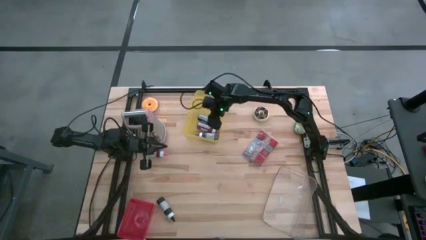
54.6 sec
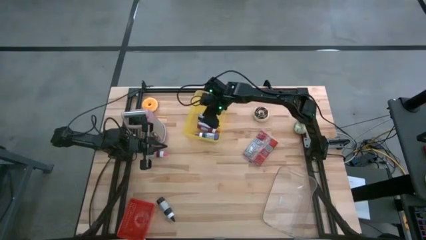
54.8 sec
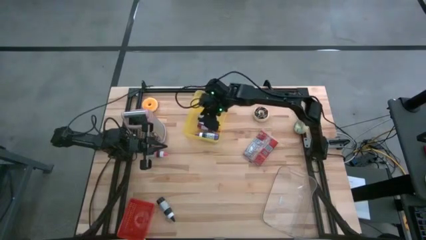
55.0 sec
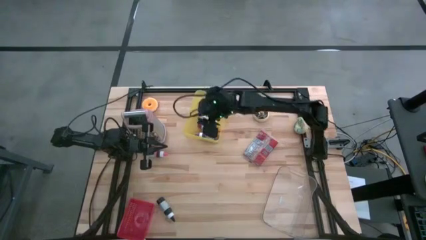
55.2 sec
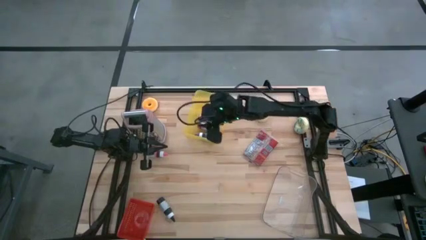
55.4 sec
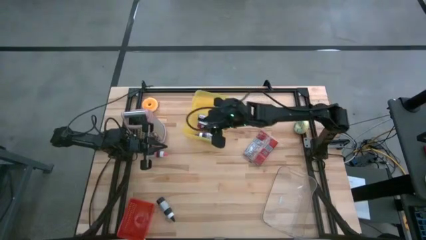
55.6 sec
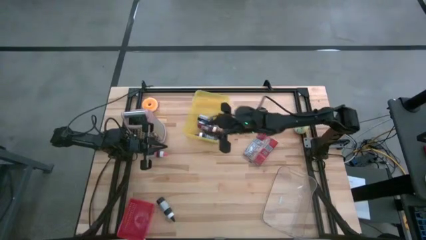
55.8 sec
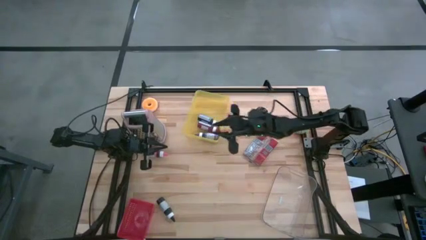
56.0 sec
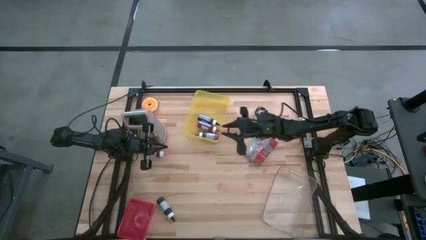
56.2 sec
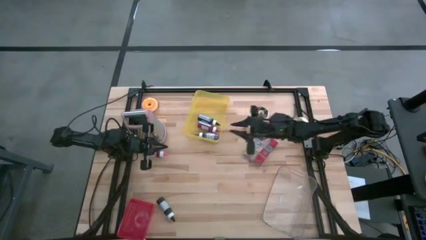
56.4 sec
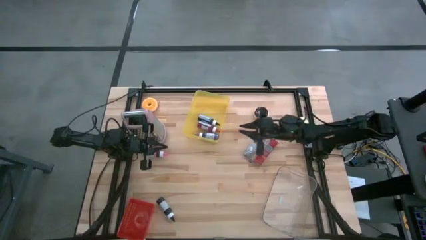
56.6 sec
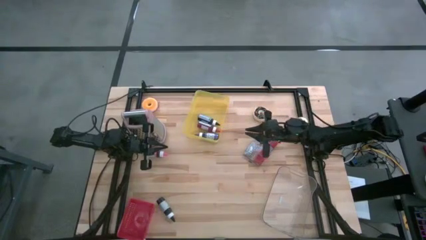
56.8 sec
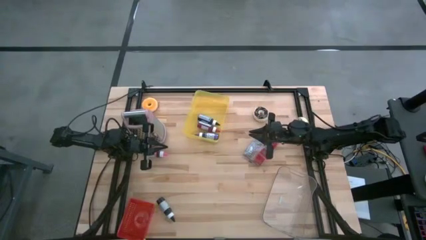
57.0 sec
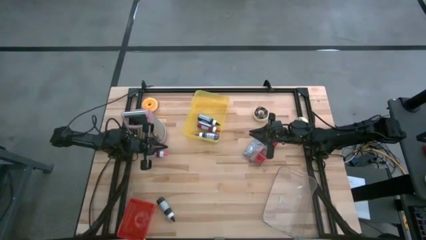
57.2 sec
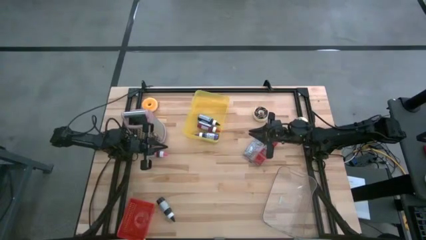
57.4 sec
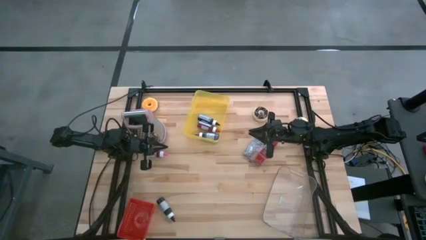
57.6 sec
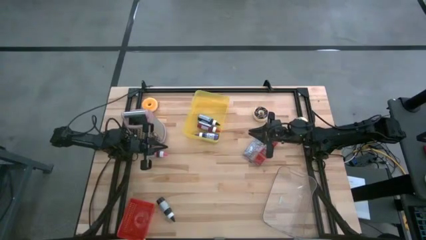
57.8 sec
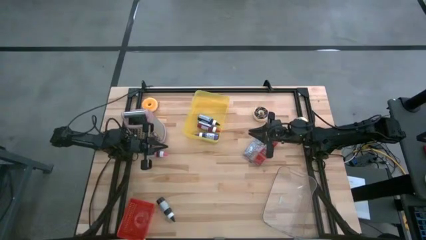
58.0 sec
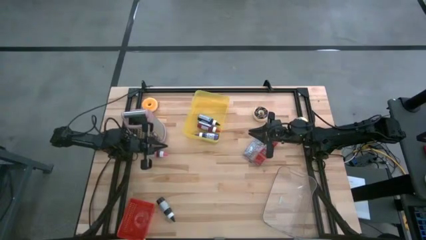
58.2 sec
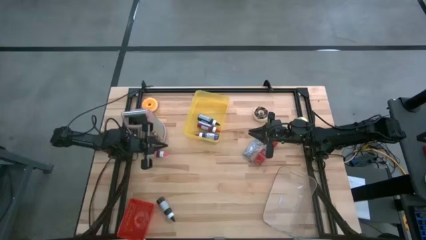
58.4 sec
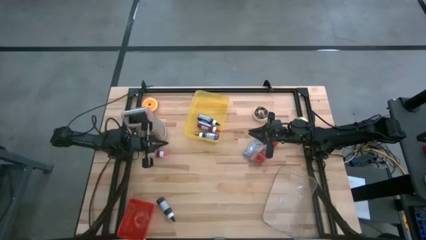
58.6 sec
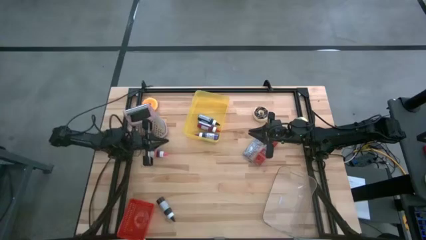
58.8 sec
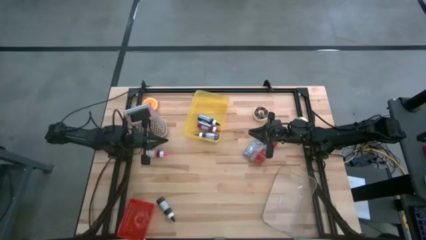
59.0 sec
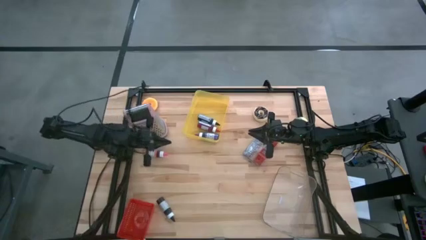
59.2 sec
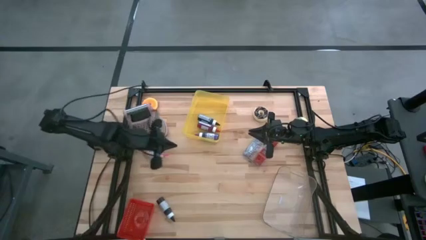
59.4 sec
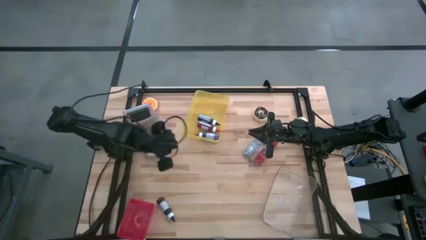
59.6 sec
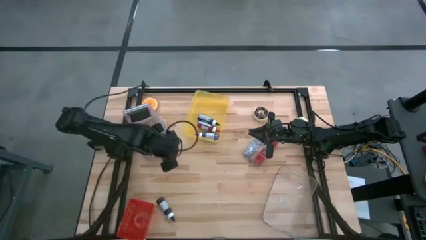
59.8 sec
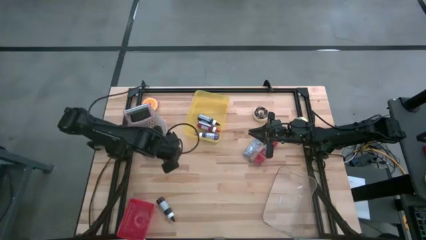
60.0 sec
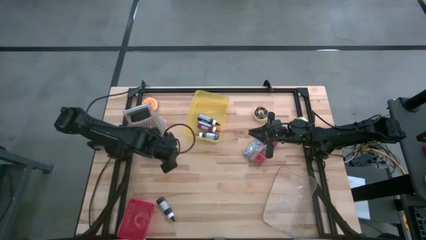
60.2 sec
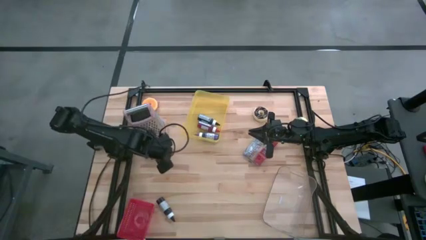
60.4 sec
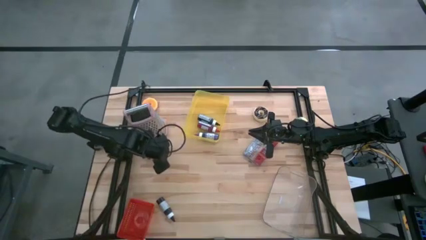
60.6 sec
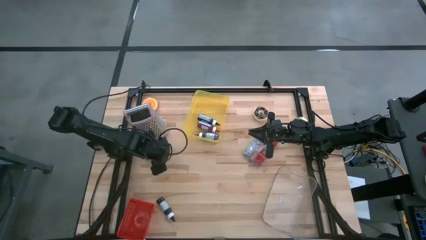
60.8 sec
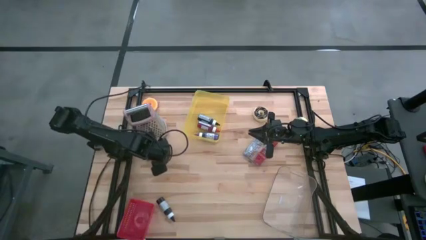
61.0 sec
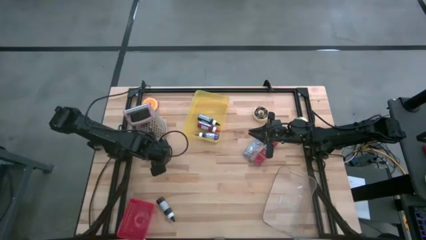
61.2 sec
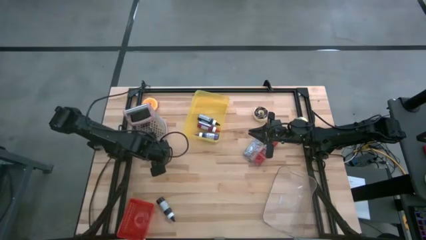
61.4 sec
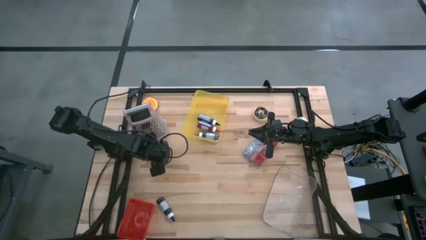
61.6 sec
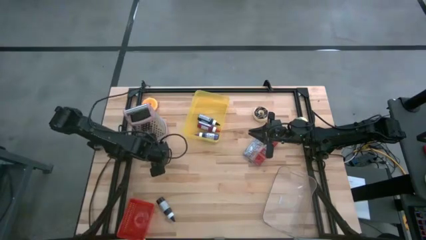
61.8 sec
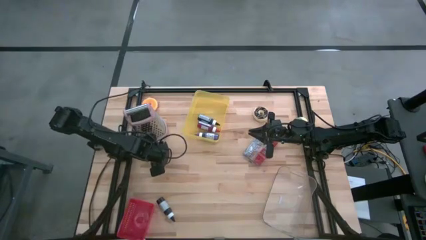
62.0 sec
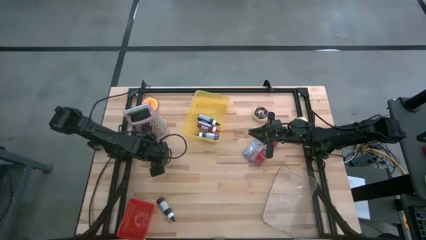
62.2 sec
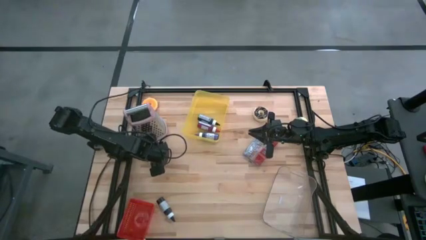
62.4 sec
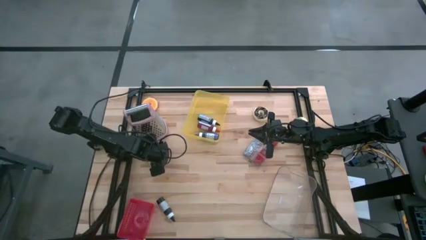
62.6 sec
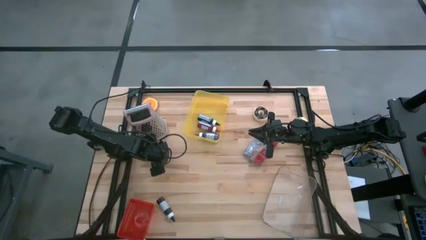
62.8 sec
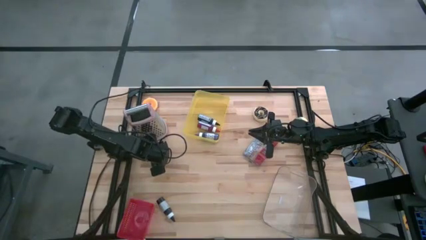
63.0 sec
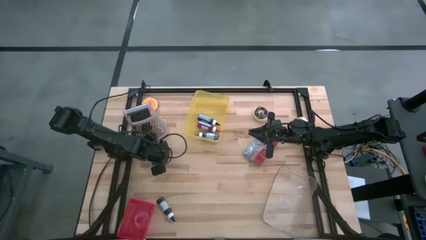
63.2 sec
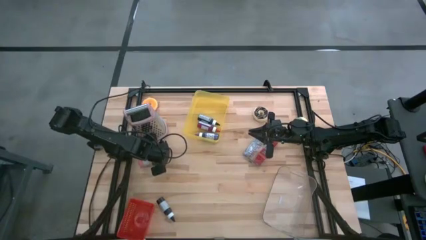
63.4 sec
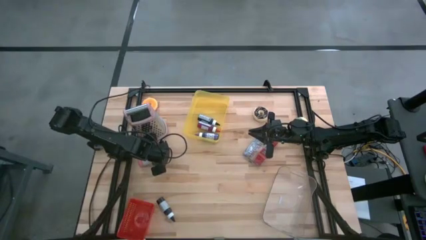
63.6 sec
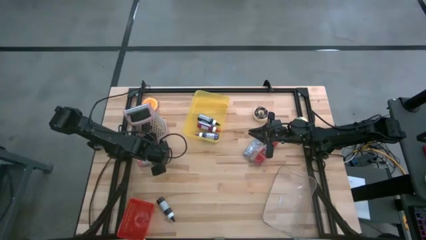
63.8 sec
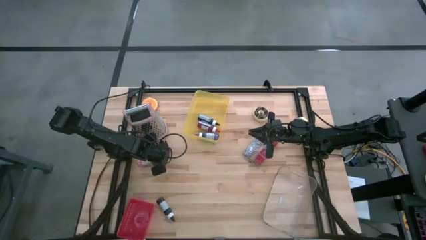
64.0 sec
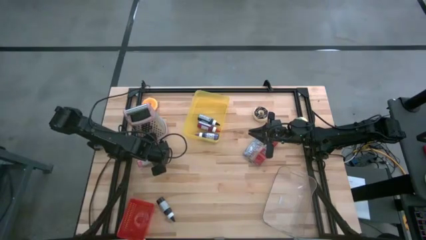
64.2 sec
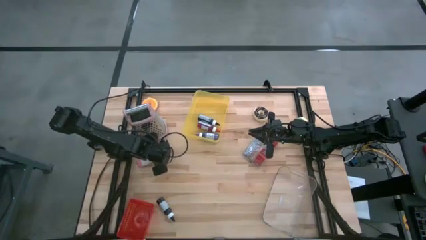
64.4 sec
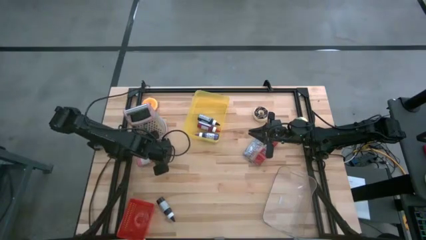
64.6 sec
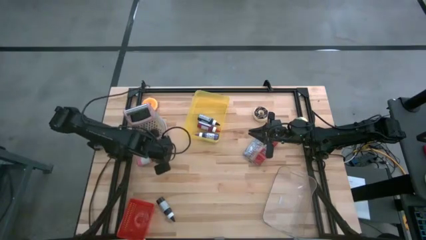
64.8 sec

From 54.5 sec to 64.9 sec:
Task: Pick & Place Food Item
Put the pink food coloring into the yellow bin
